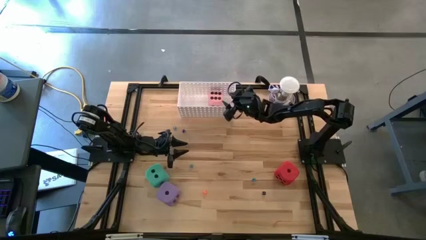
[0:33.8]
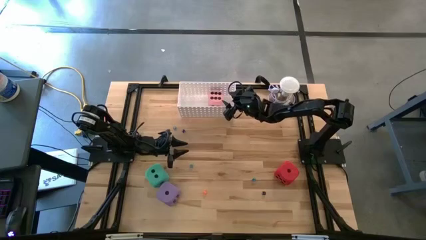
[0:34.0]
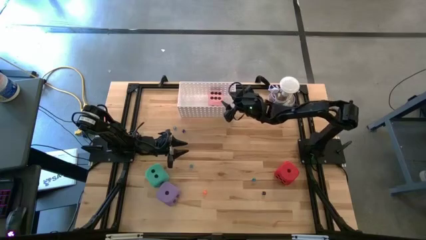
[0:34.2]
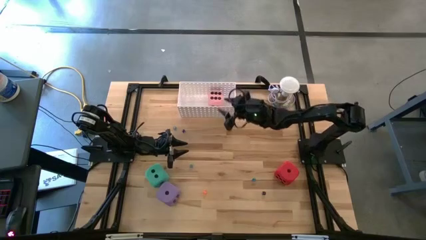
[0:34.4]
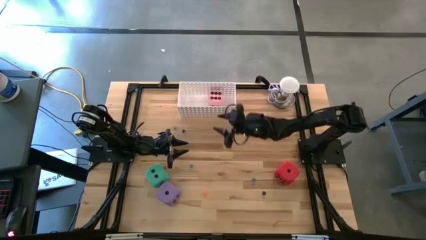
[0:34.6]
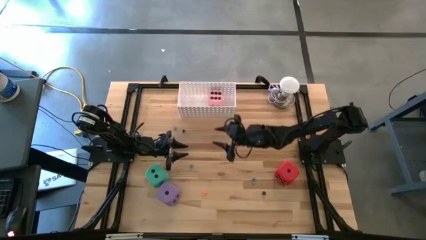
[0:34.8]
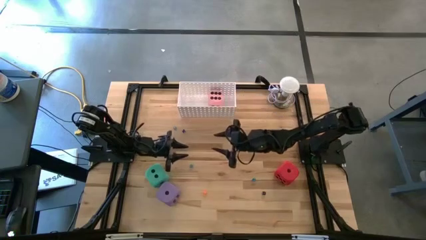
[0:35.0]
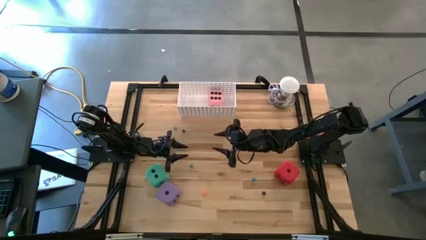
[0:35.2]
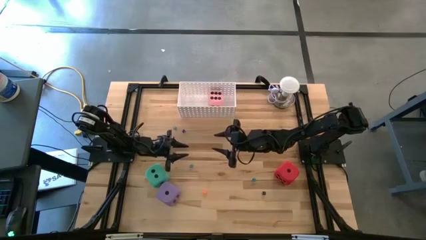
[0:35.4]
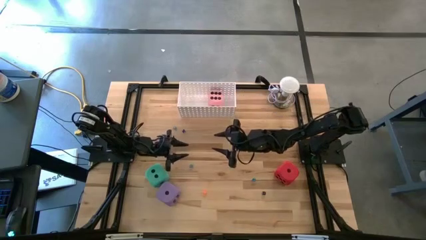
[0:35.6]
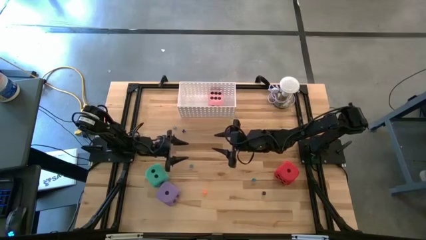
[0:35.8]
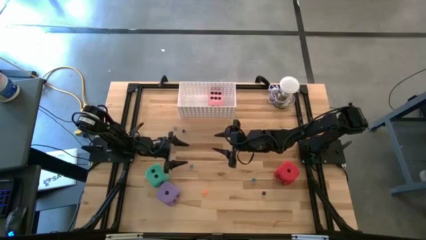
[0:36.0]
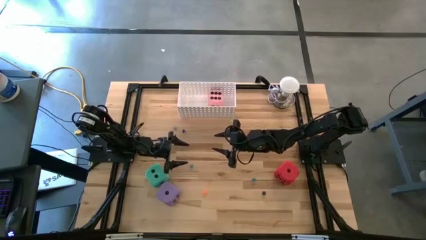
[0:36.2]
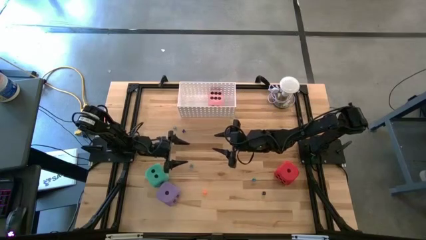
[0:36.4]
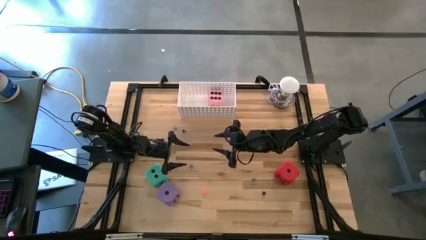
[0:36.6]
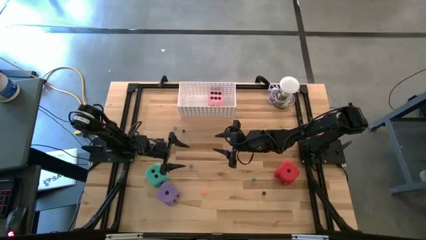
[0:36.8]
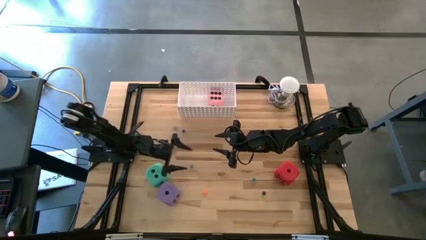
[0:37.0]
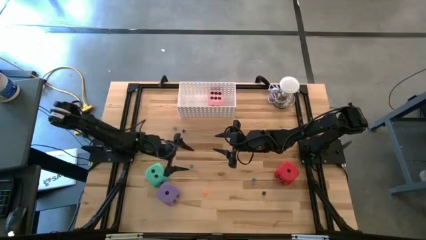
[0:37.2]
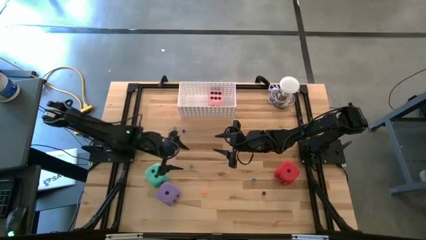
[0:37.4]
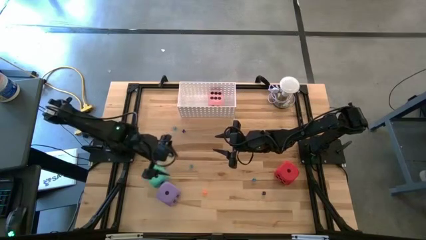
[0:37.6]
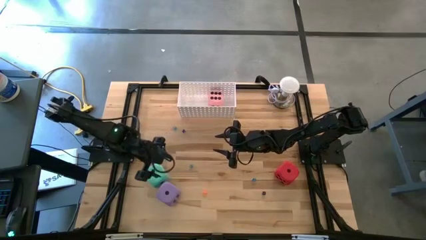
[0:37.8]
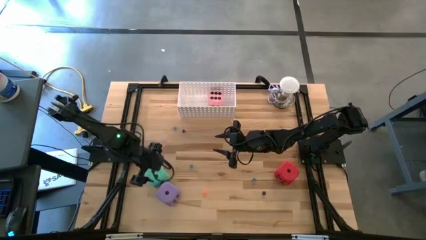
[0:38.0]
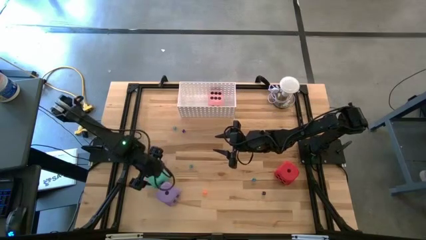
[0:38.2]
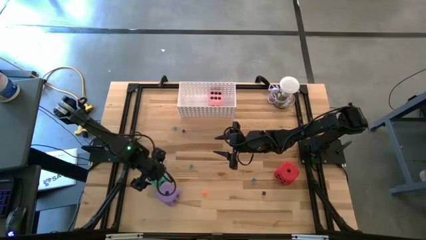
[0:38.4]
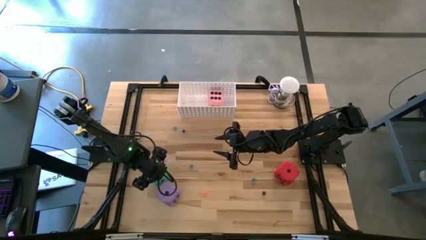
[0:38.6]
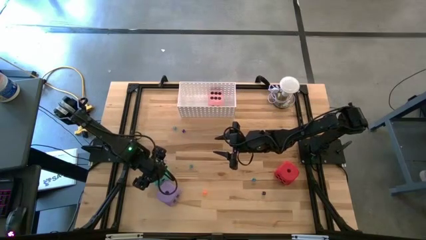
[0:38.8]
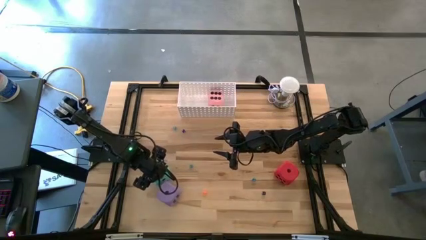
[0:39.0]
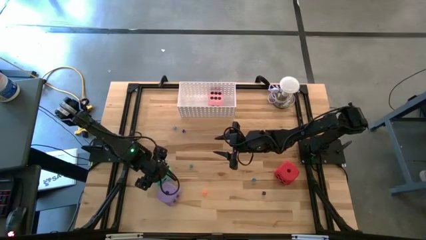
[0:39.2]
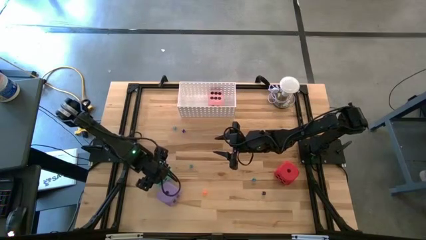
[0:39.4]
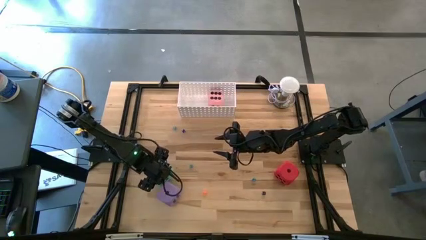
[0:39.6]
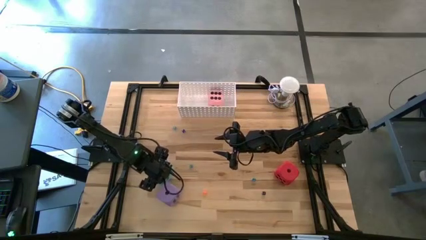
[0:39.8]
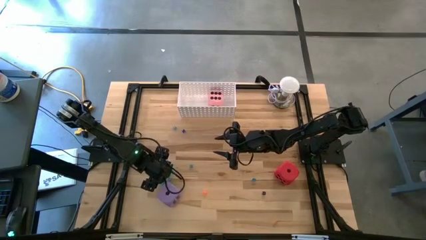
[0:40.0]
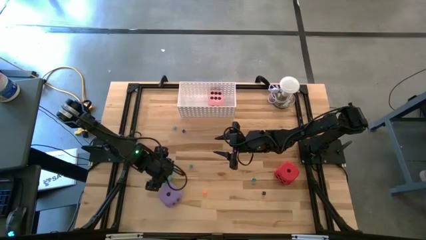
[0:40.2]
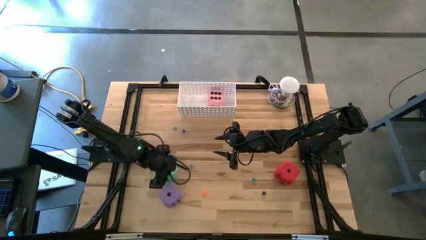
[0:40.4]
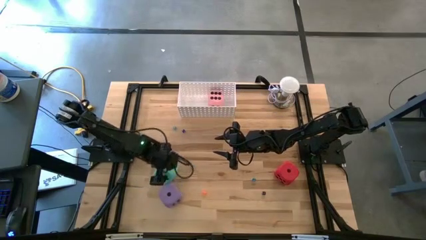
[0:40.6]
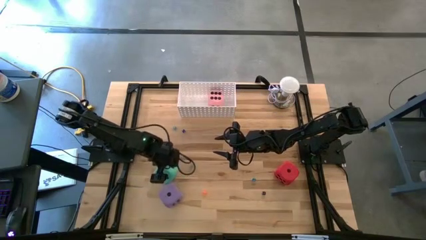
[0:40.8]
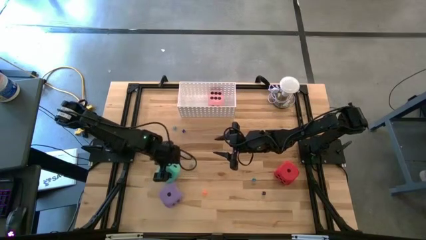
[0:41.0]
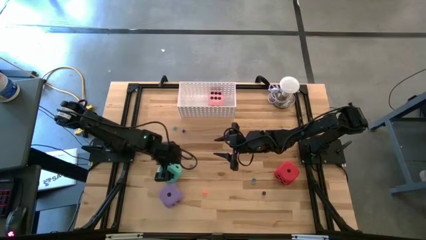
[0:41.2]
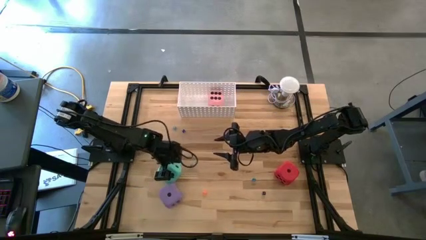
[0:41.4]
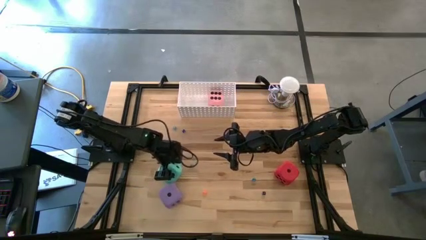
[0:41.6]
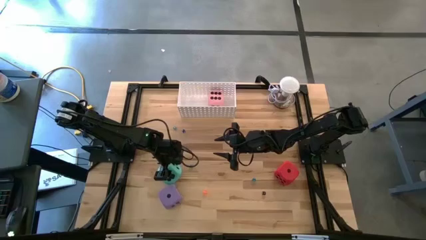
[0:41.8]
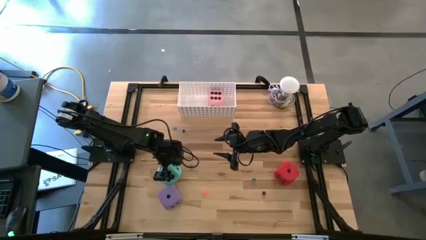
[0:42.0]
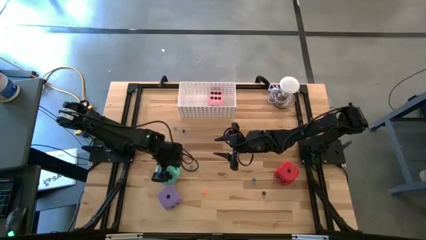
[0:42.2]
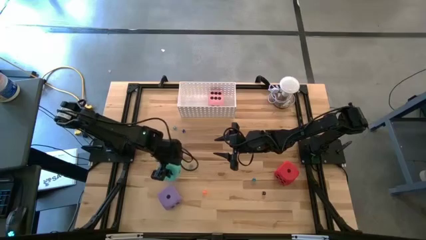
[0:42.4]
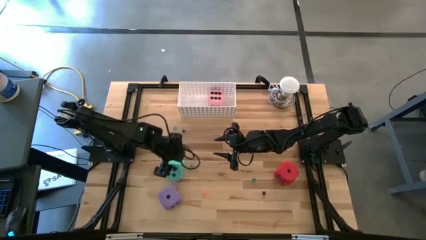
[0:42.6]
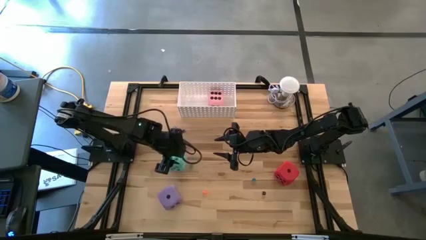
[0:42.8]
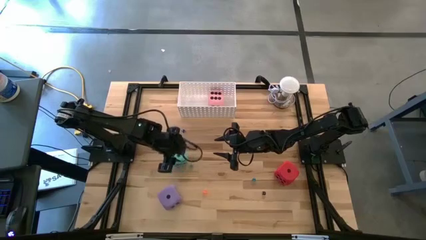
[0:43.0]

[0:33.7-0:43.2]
Task: Pick & Place Dice
Put the large light green dice into the white basket
